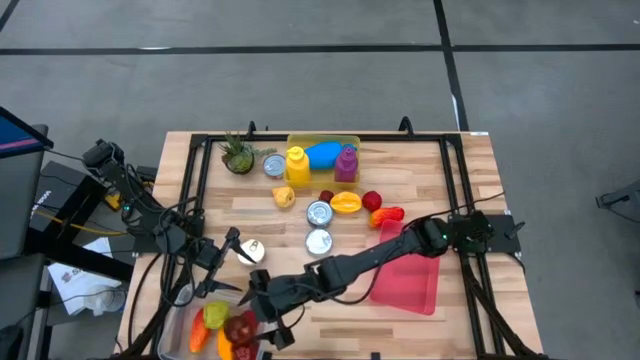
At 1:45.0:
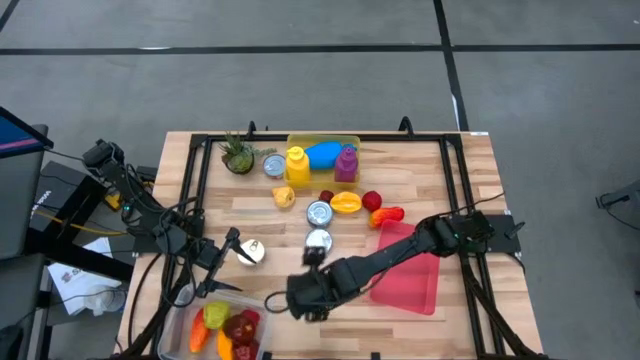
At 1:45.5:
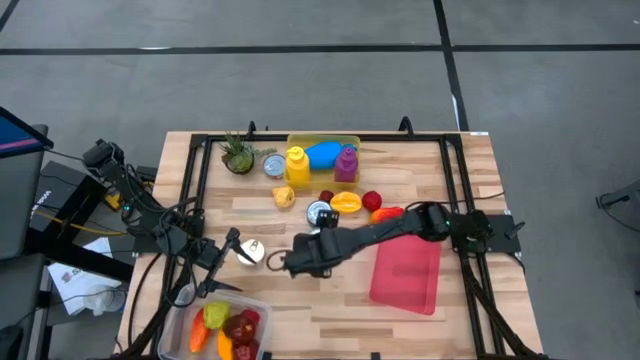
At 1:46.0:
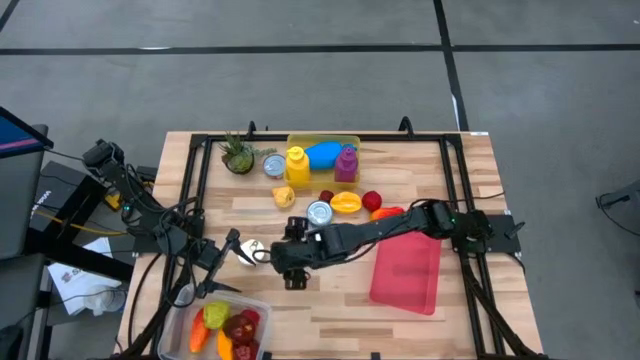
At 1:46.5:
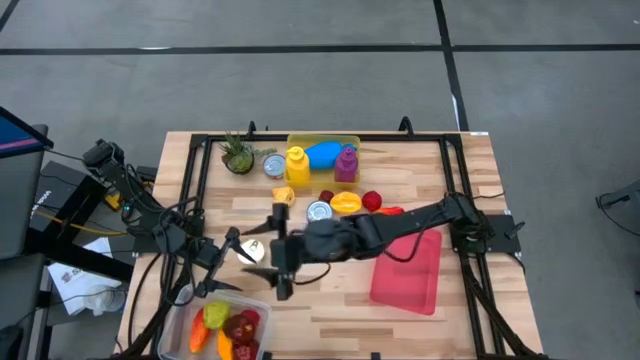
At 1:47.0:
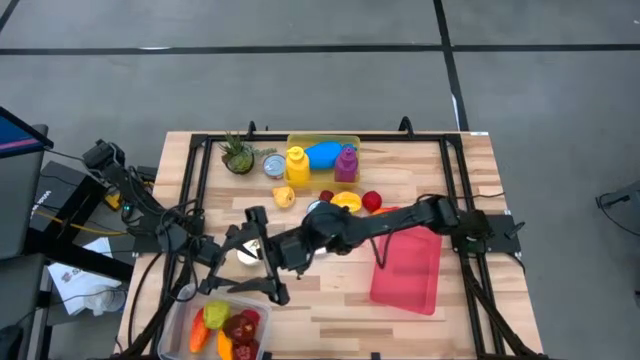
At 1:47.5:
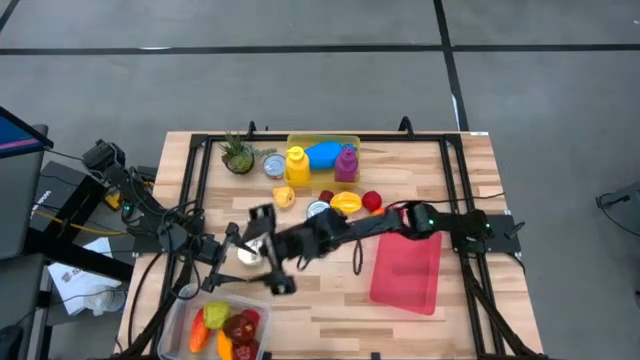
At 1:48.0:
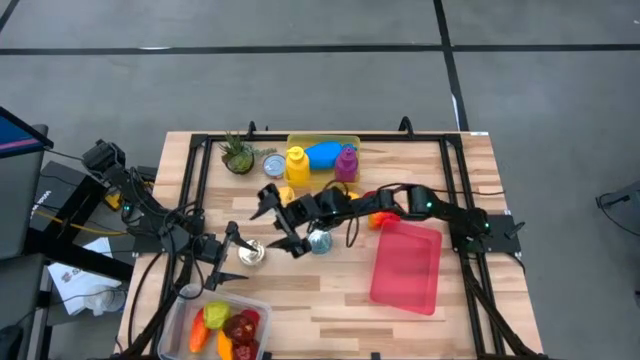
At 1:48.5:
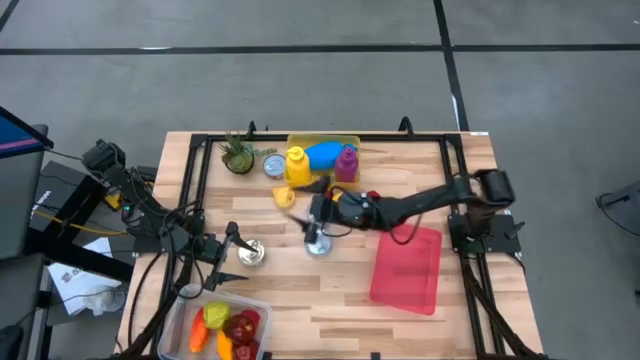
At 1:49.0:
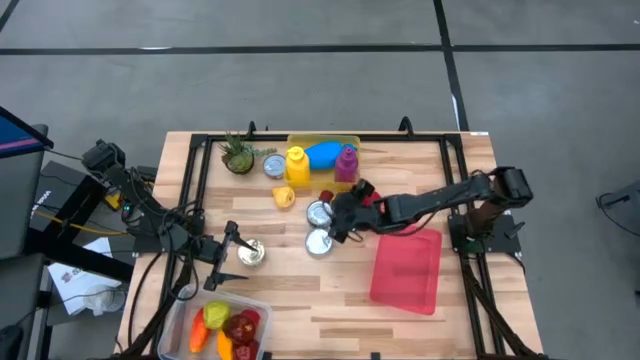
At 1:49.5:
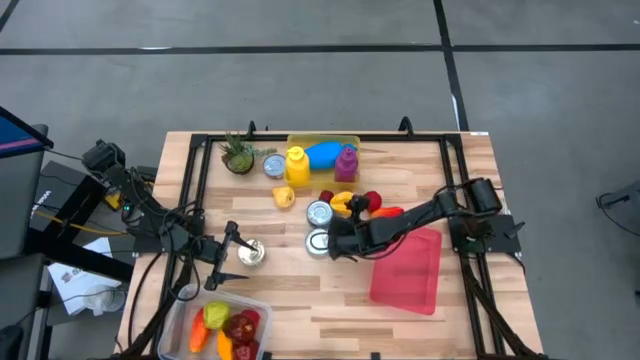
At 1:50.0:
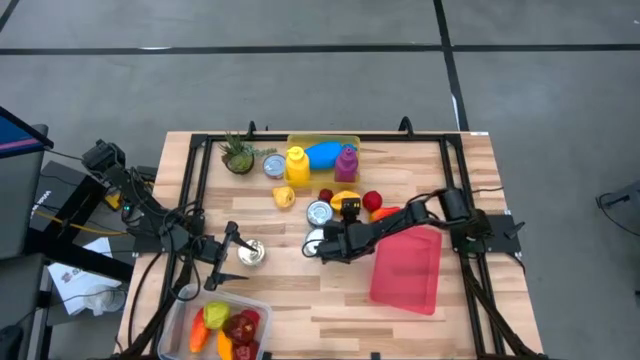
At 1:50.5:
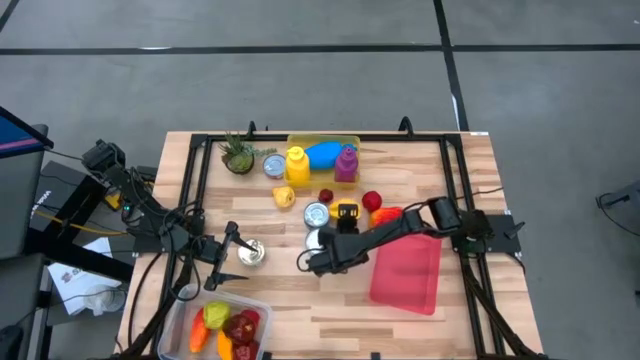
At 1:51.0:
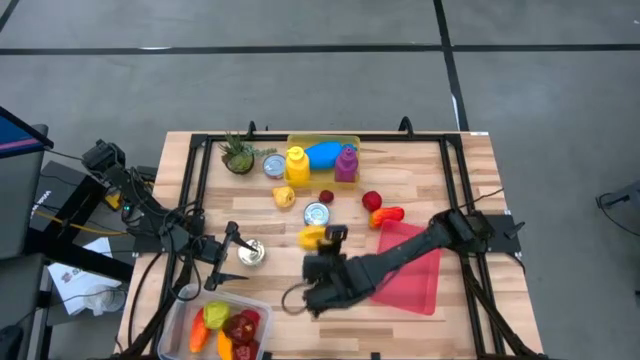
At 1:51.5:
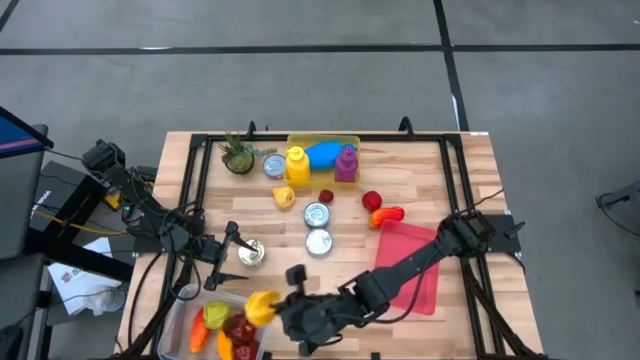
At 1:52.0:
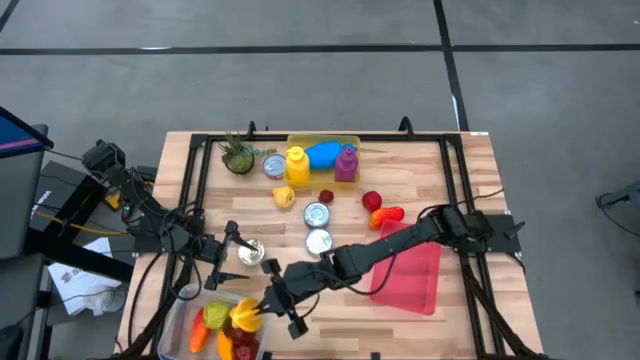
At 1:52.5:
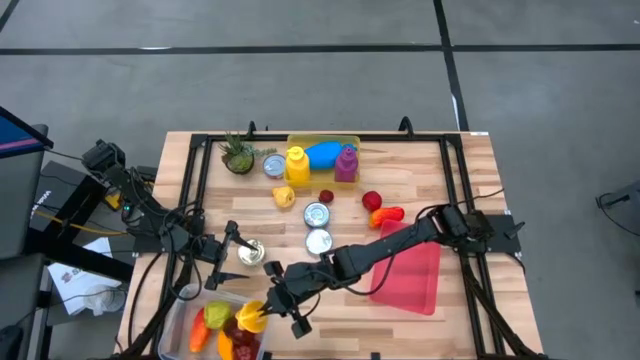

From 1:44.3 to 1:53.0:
Task: Pick & Place Food Item
Put the yellow starfruit into the white bin

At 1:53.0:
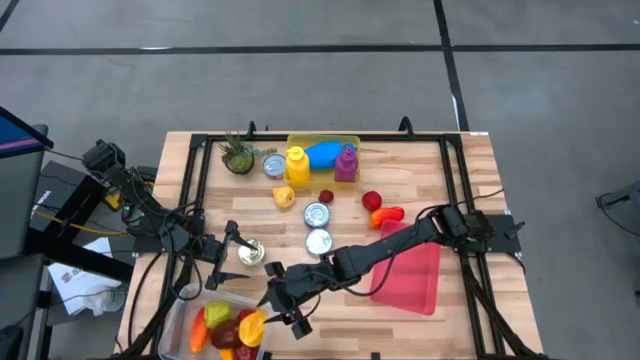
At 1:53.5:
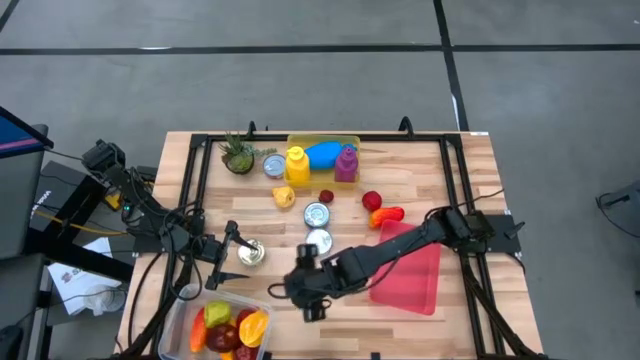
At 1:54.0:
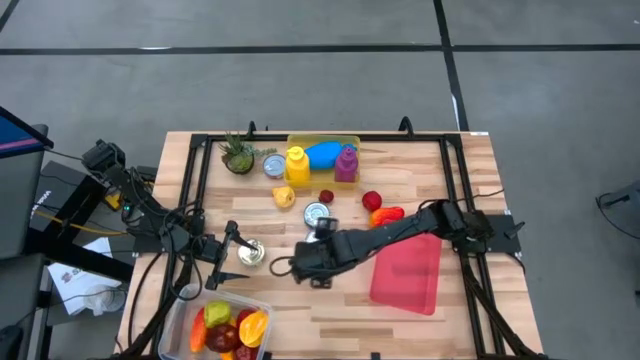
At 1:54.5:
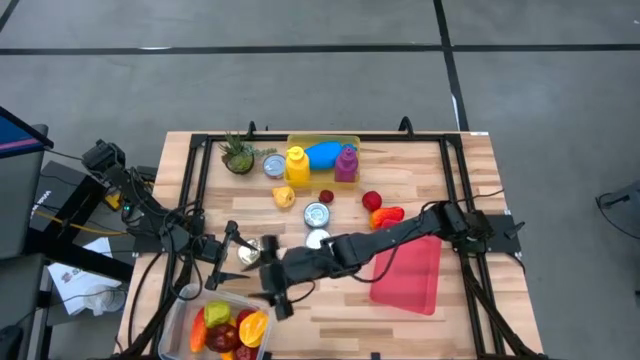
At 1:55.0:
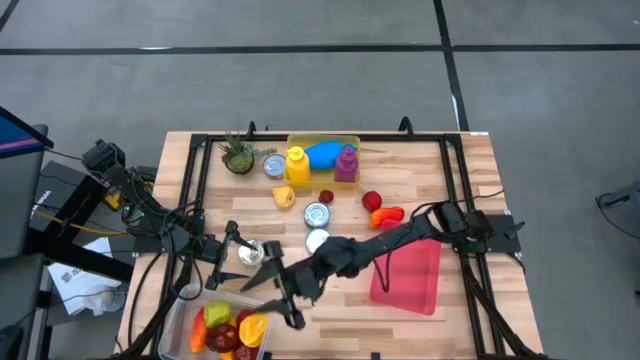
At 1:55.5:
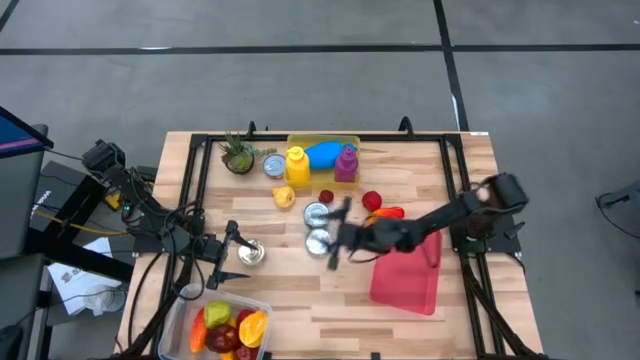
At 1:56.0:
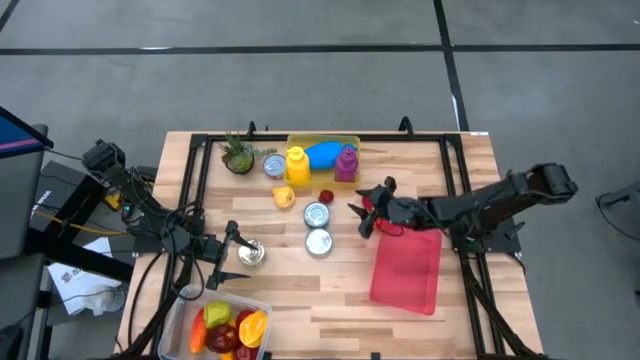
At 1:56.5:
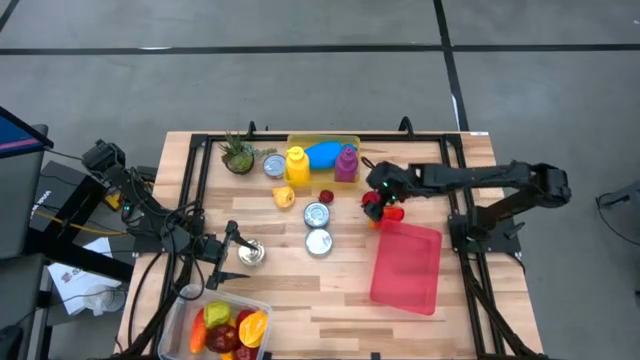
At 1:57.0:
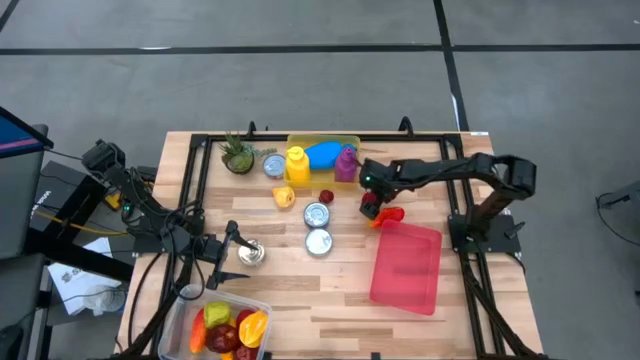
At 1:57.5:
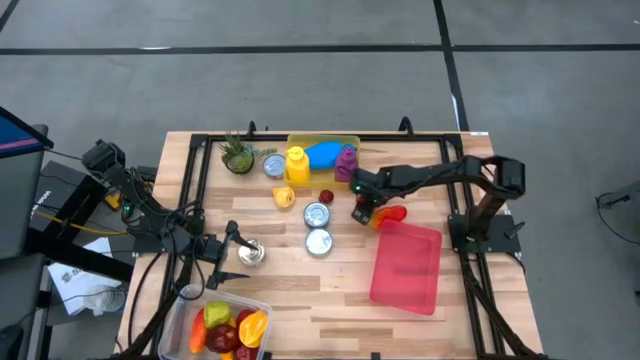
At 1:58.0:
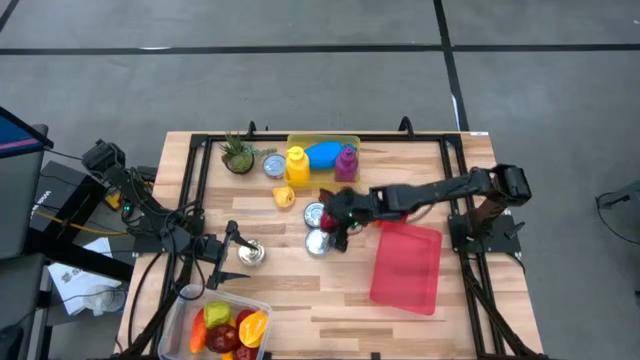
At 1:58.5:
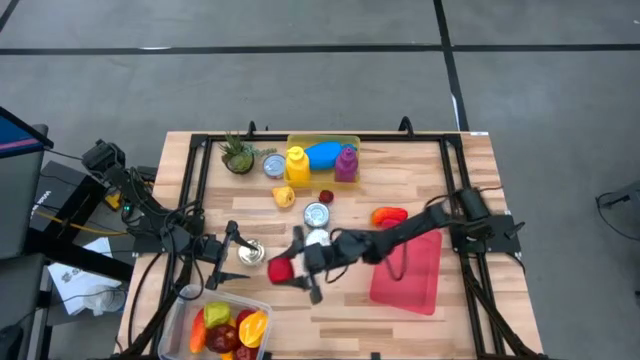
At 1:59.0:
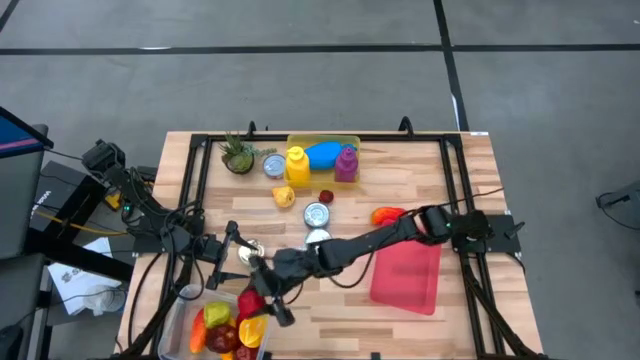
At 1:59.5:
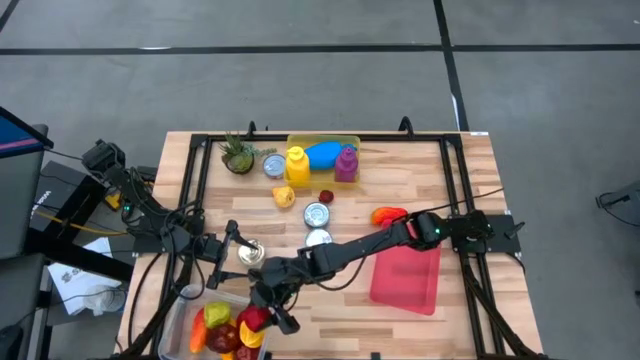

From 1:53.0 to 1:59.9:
Put the red tomato into the white bin

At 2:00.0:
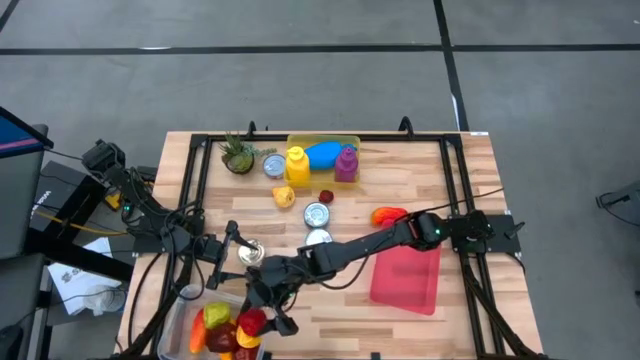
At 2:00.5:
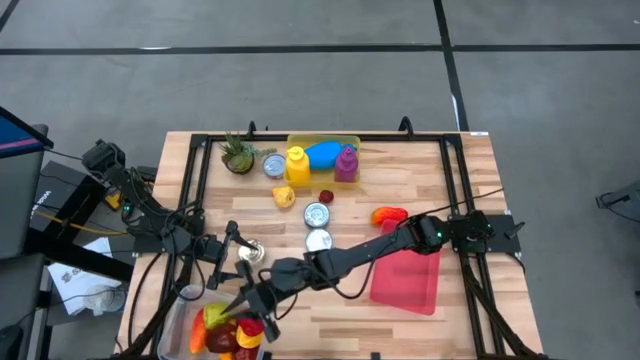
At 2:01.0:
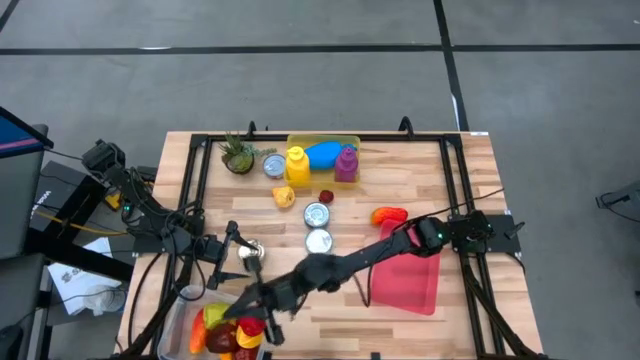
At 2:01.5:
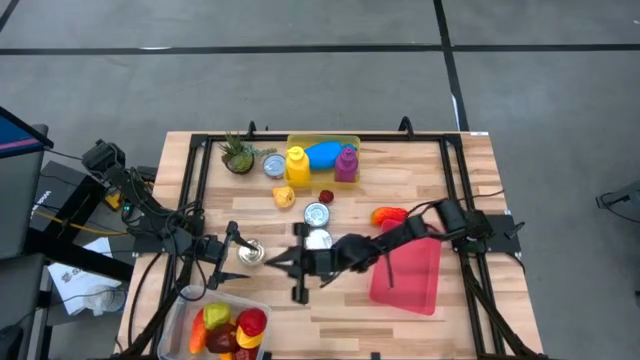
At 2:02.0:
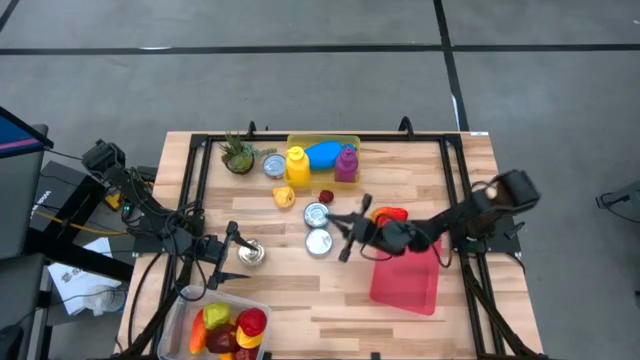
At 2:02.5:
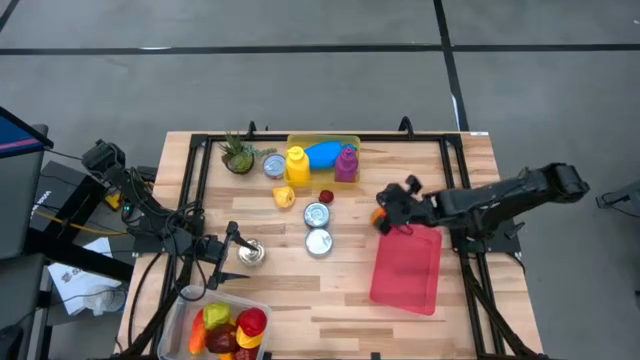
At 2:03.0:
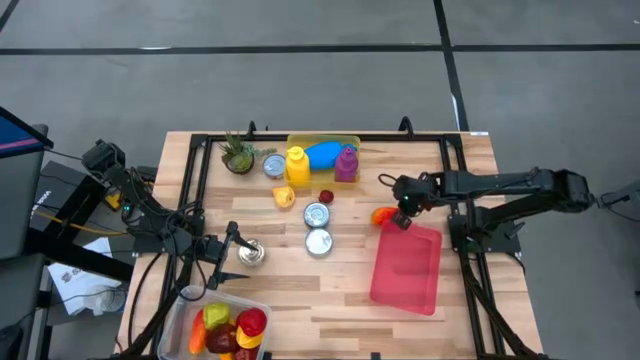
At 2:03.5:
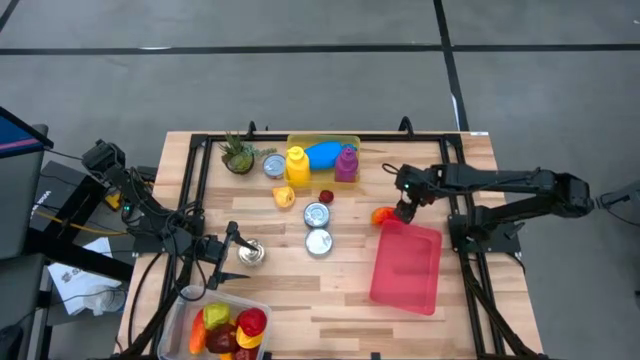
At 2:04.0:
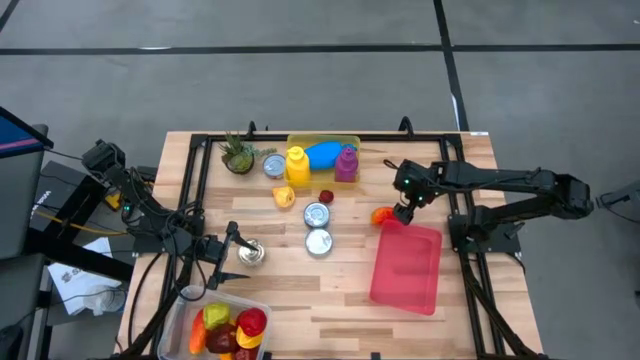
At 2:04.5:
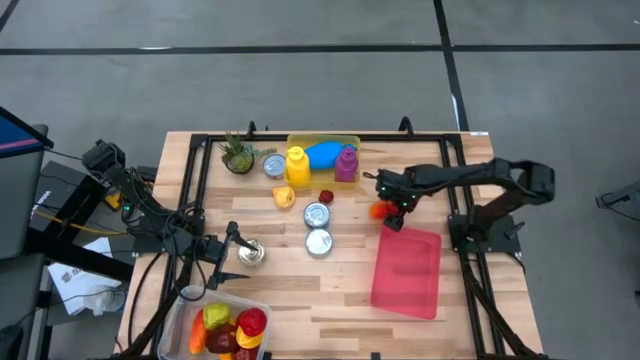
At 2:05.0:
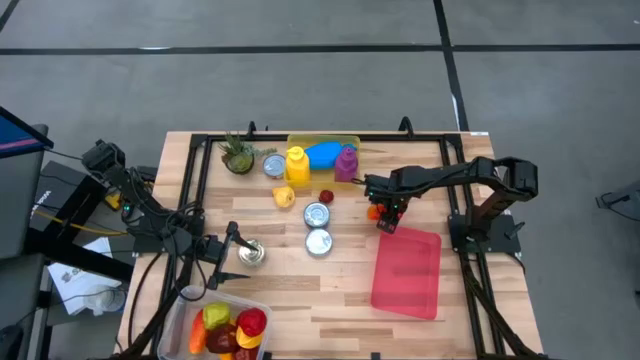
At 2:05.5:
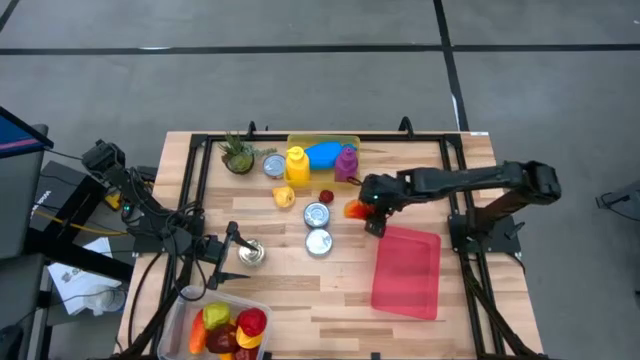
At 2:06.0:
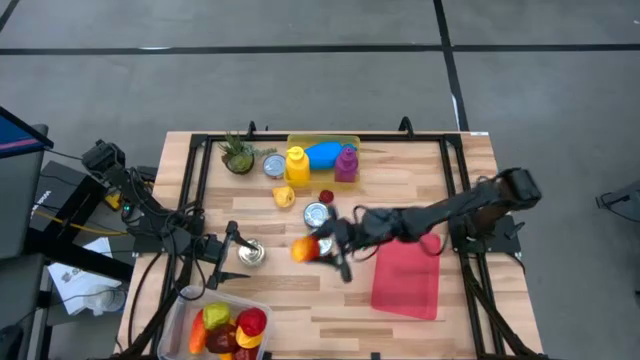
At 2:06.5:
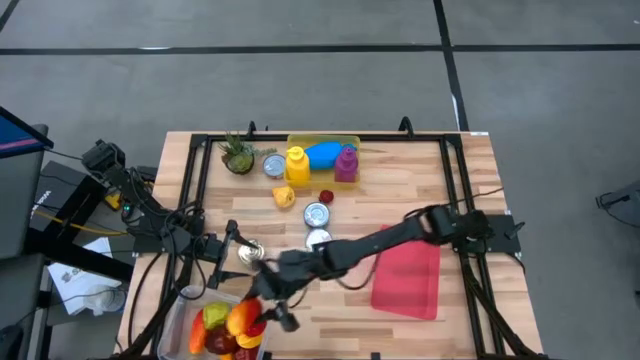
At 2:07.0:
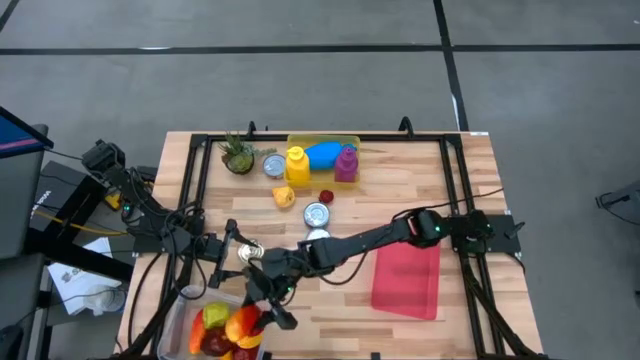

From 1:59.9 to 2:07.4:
Put the red and yellow mango into the white bin
